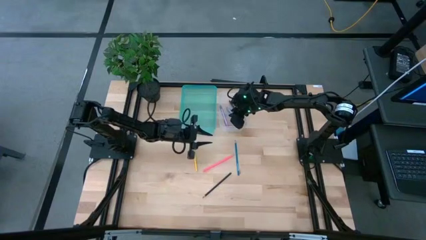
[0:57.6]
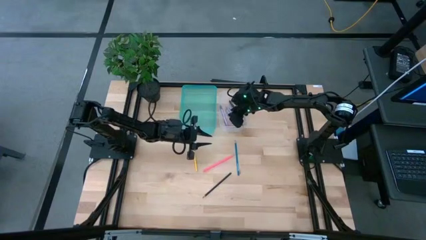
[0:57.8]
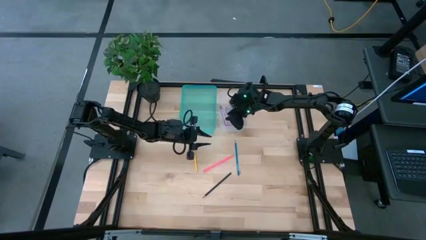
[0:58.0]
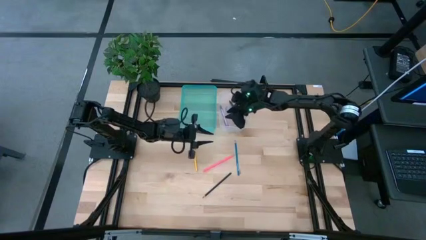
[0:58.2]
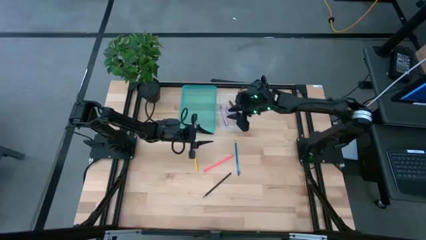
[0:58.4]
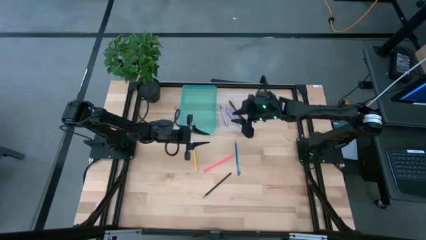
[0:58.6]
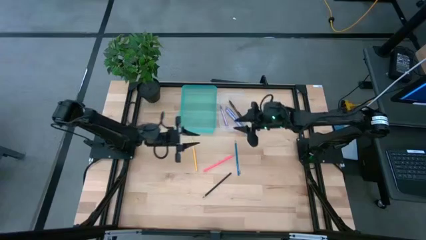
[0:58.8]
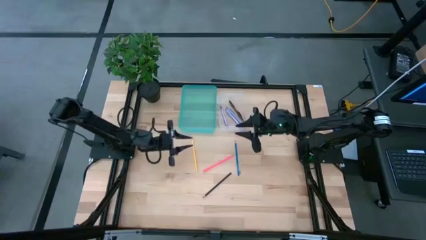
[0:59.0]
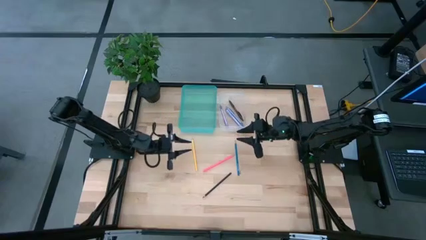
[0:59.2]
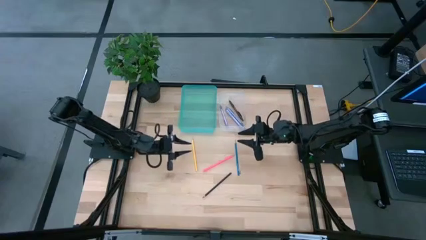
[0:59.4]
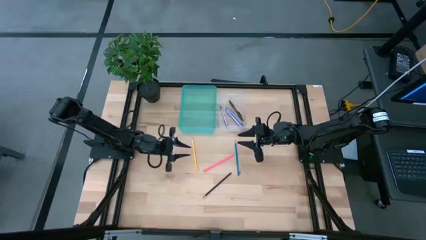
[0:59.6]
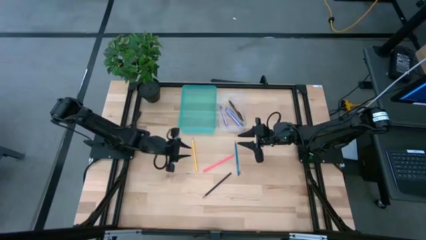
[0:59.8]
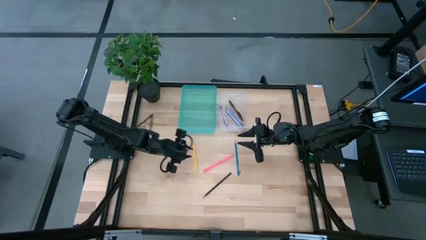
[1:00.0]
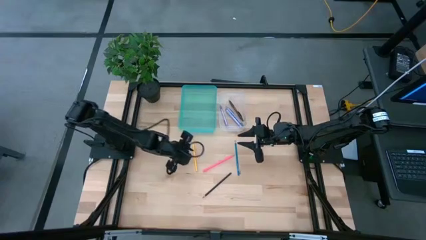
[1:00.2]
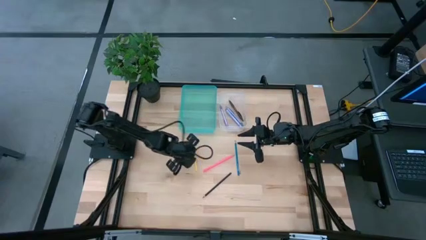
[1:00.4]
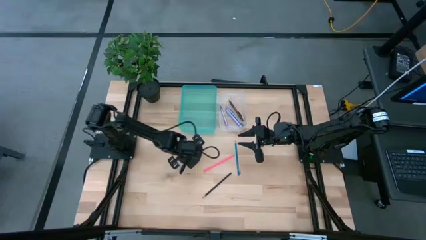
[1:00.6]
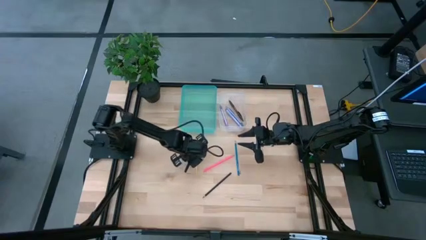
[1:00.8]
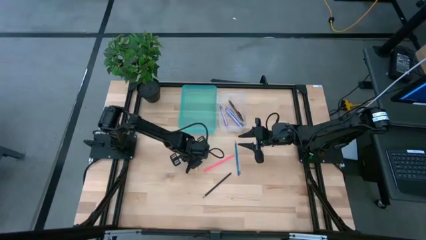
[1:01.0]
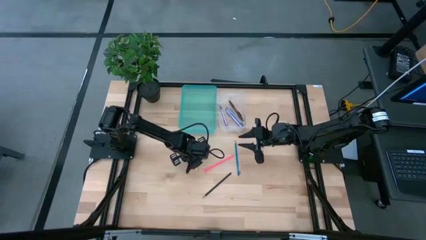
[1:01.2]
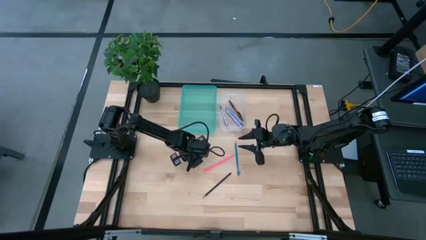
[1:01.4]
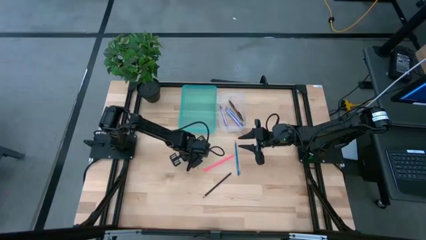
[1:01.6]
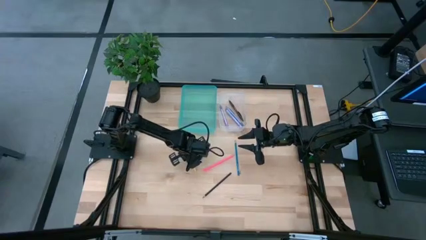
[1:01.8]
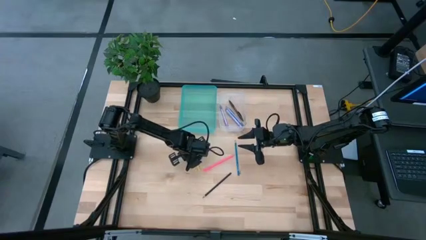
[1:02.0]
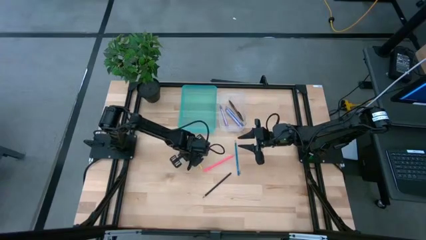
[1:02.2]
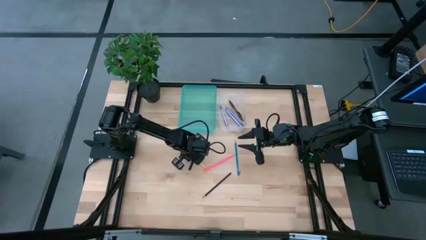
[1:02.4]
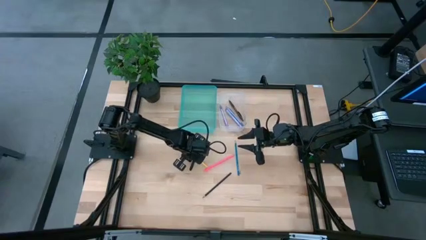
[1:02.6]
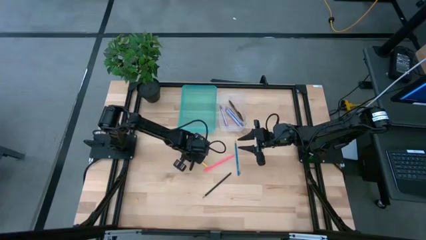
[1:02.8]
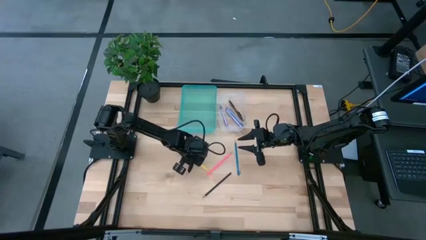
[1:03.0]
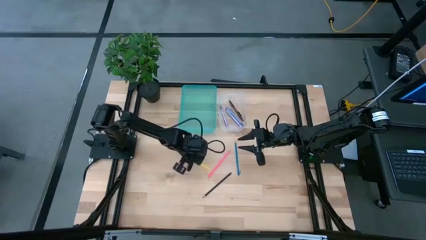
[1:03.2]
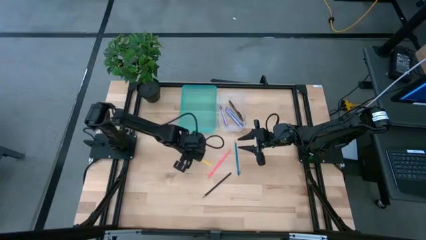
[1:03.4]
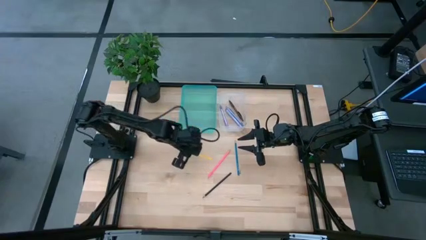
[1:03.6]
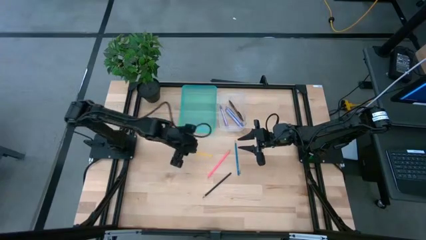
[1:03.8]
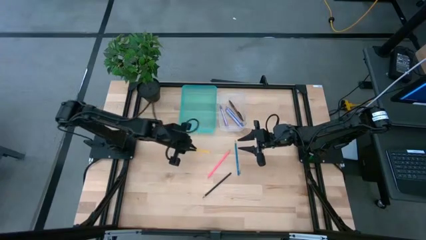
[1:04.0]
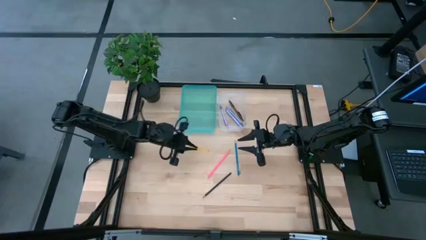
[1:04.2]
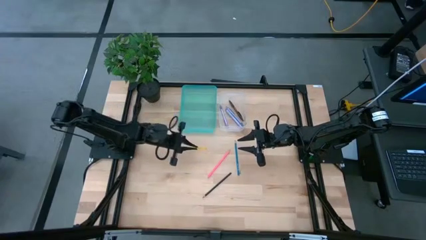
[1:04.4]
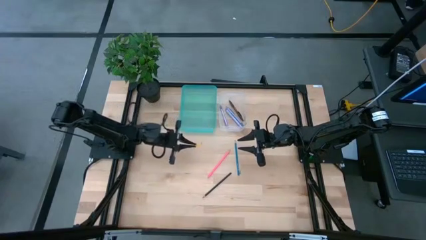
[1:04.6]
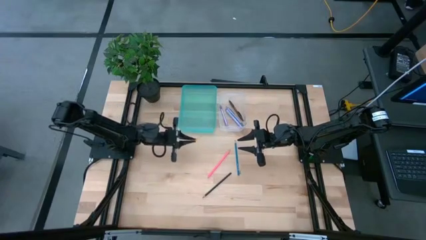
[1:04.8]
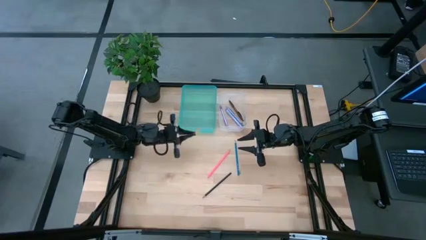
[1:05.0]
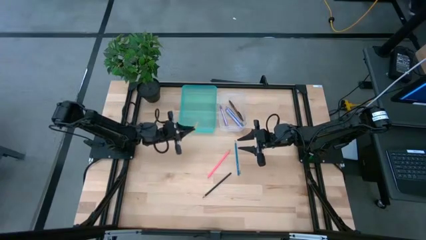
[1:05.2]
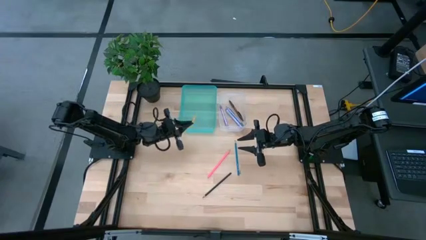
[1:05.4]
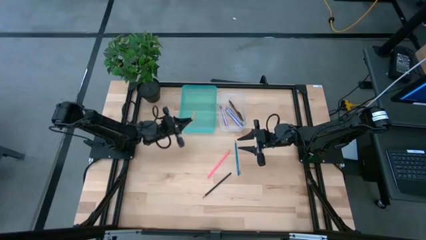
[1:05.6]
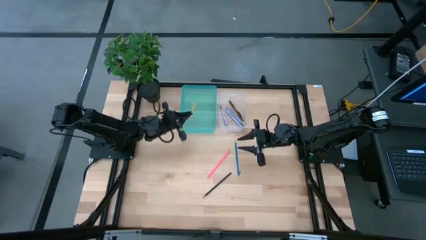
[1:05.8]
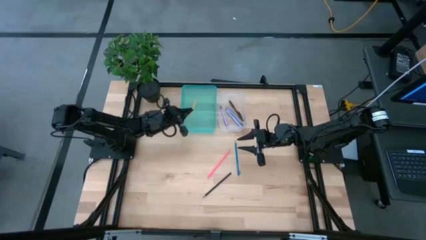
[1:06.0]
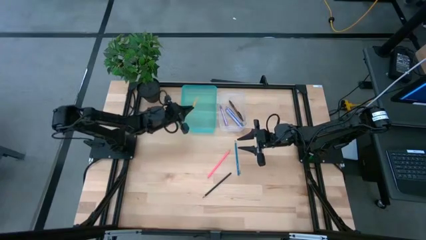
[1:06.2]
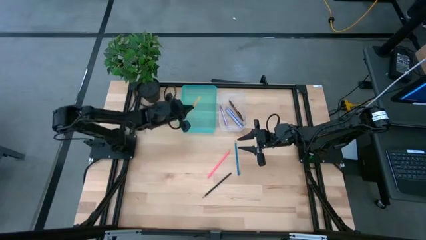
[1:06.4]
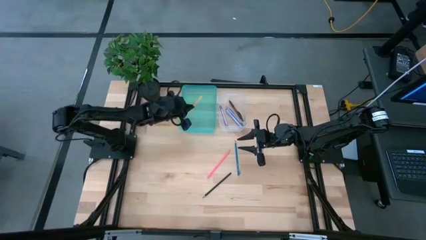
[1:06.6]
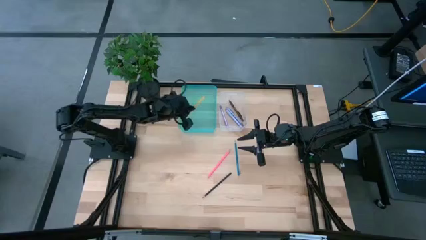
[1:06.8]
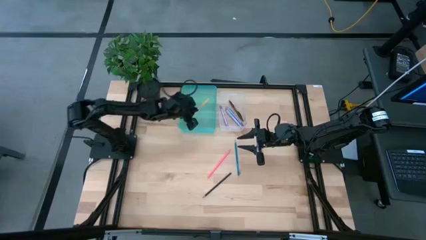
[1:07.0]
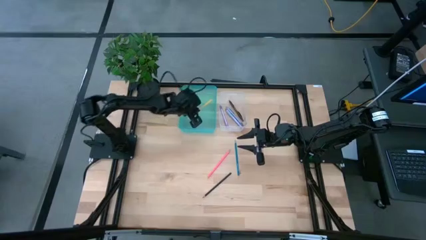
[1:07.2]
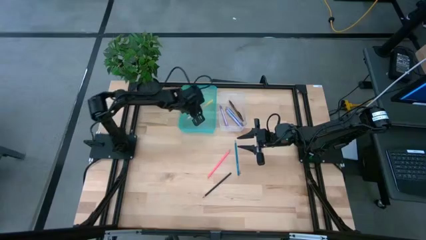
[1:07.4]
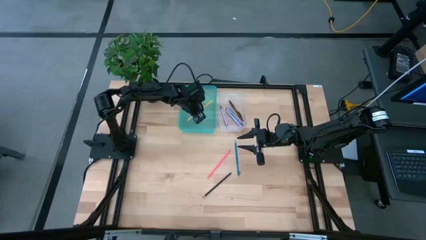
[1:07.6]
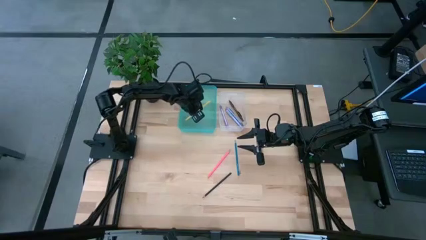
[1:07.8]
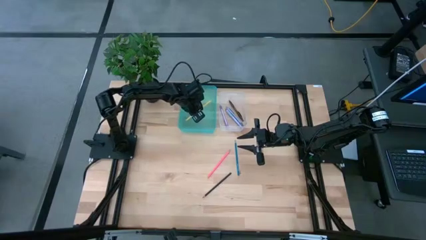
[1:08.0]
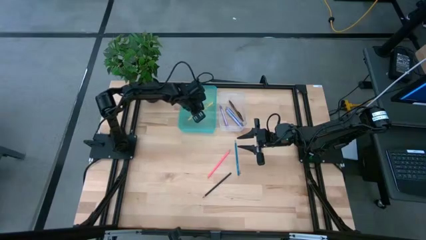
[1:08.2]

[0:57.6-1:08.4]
Task: Sort pens & pencils
Put the yellow pencil into the blue bin

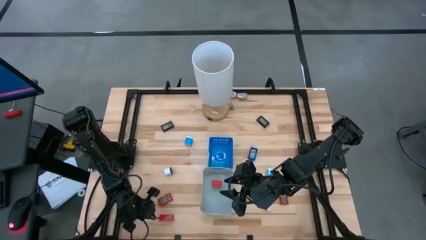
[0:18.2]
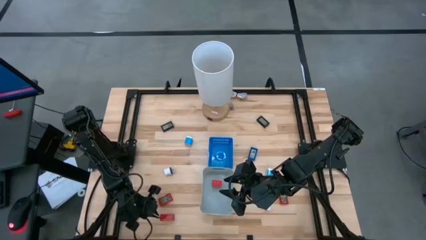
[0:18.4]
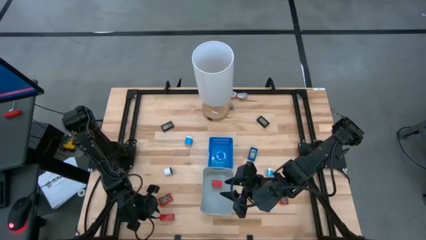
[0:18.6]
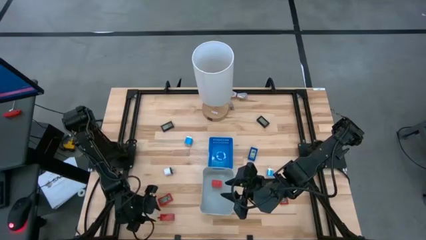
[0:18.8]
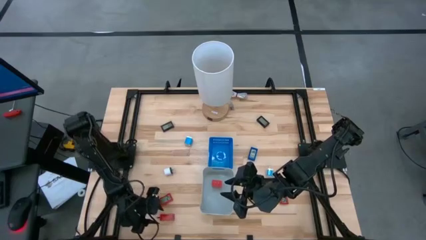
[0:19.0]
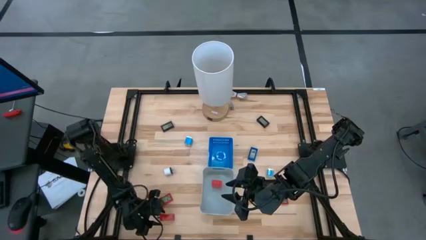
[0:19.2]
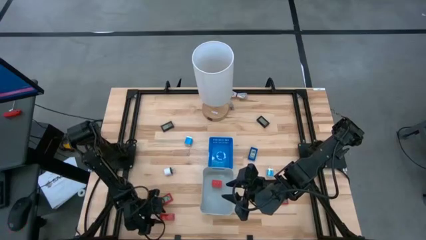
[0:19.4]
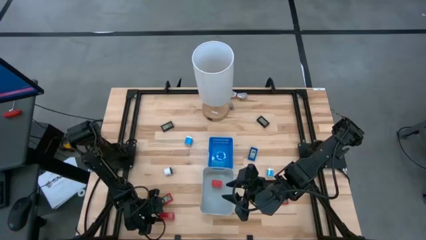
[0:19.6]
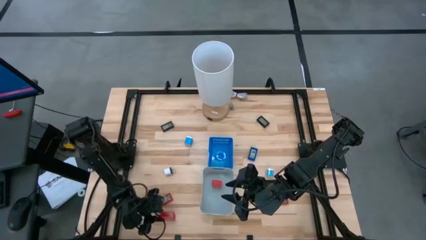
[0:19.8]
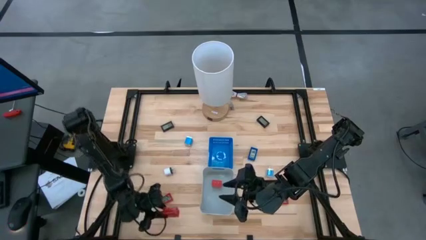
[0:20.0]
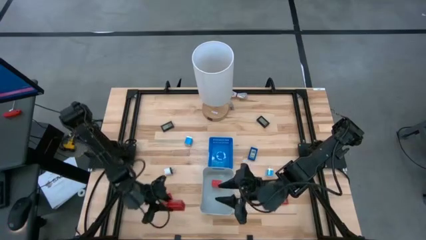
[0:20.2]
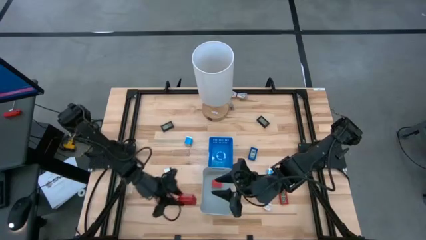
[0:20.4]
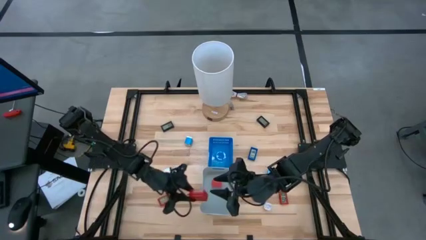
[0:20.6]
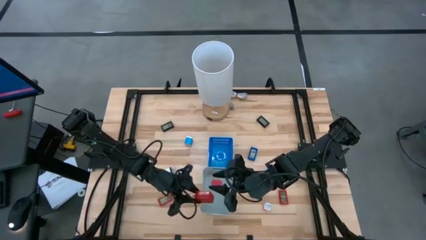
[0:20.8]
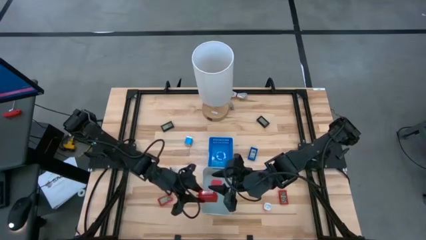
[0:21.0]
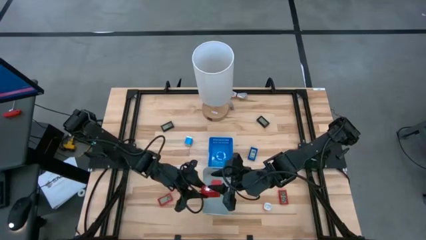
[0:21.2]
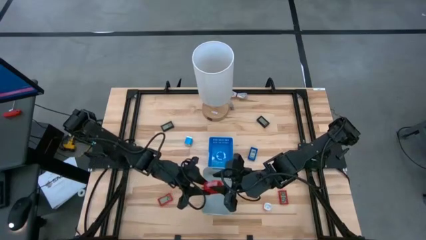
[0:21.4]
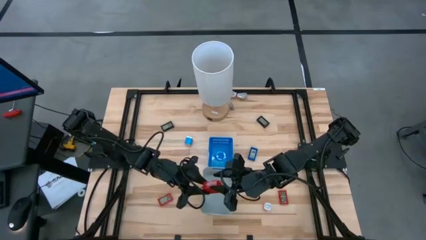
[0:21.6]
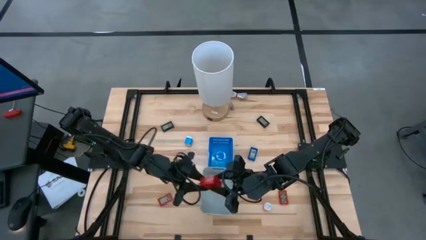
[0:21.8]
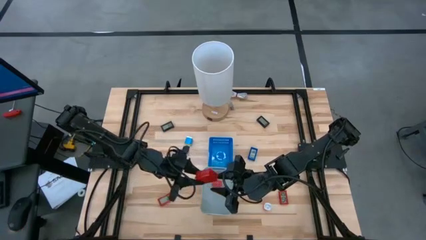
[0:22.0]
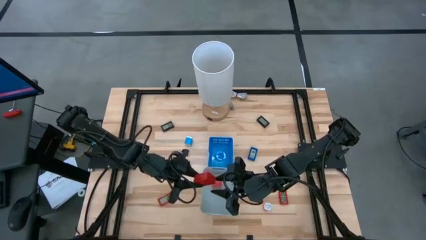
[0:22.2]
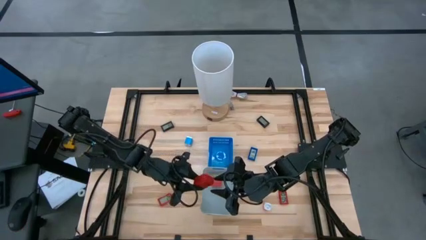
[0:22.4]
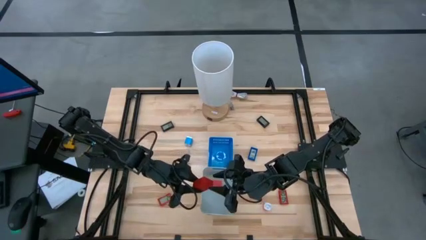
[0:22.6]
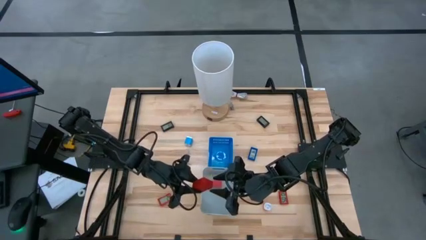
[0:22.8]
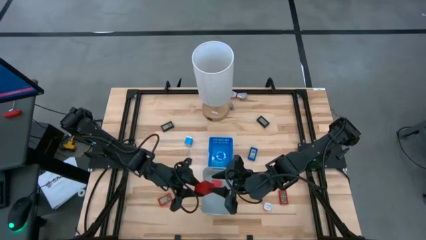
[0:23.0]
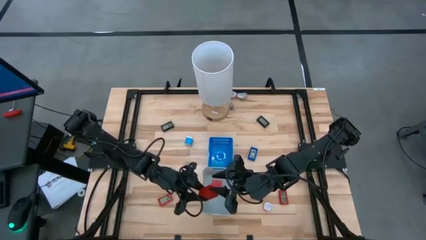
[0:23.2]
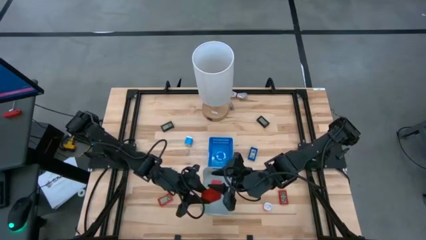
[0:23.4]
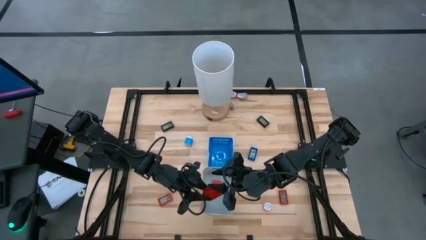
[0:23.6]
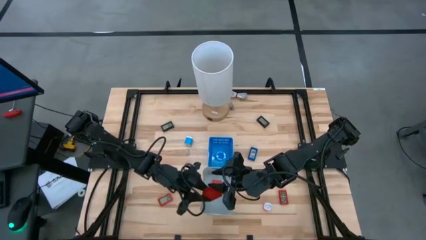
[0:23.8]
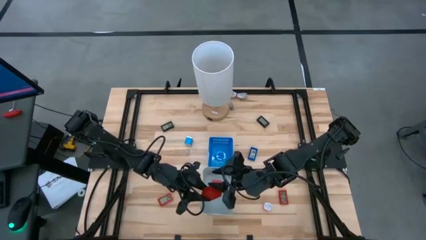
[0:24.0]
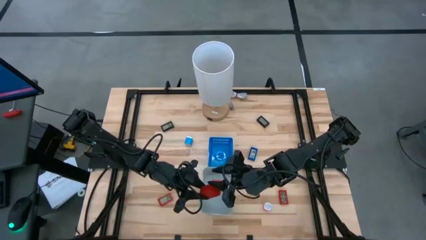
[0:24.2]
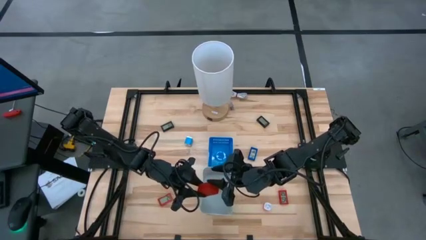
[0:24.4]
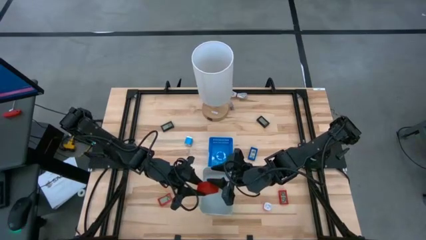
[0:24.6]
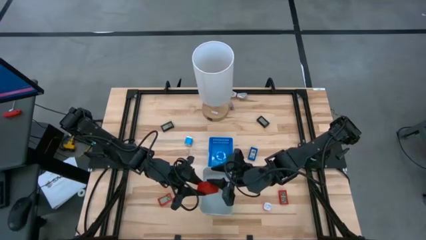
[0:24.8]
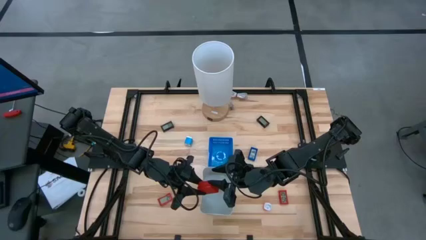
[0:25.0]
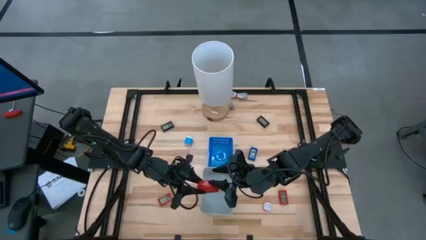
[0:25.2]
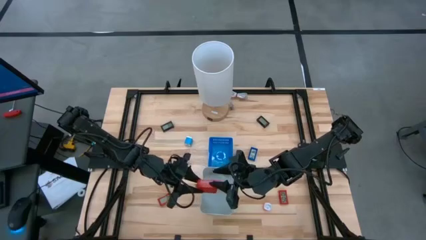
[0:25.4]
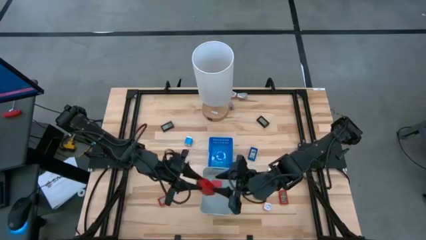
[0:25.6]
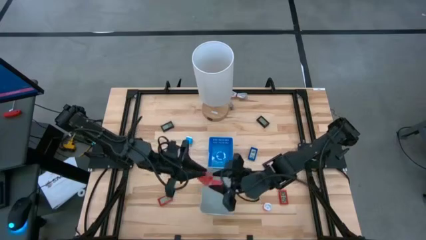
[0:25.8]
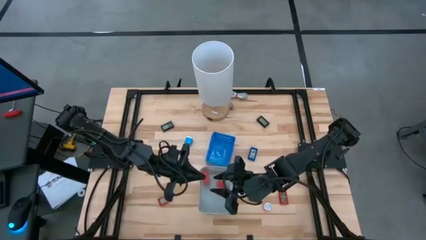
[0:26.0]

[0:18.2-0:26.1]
Task: Pick & Place Office items
Put the red charger adapter into the gray bin
